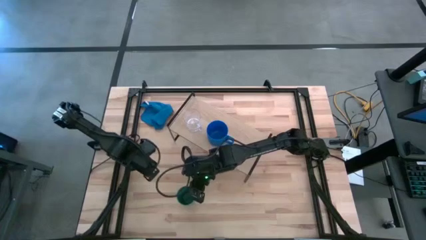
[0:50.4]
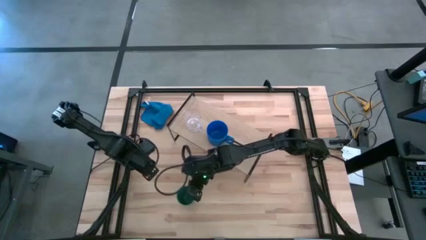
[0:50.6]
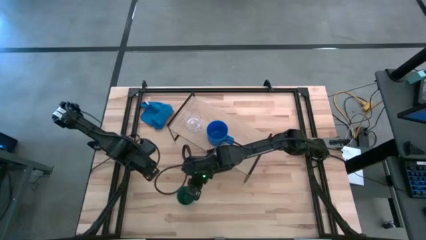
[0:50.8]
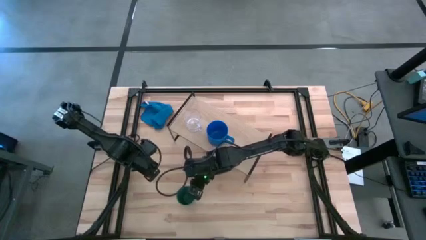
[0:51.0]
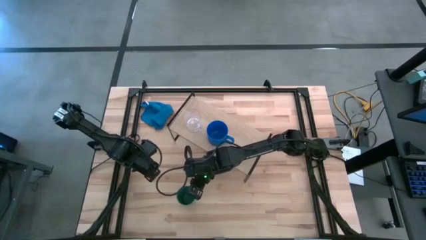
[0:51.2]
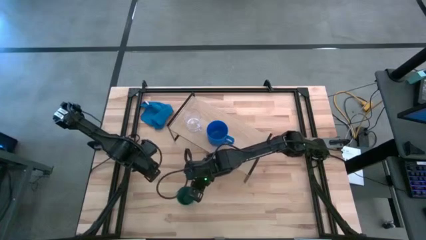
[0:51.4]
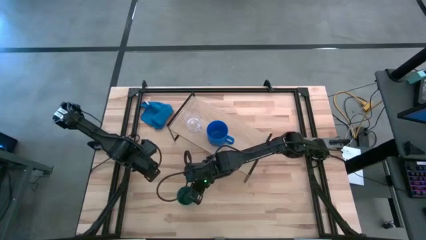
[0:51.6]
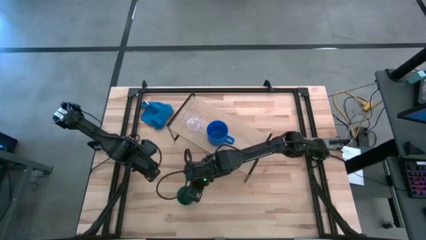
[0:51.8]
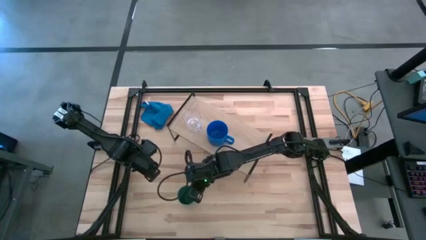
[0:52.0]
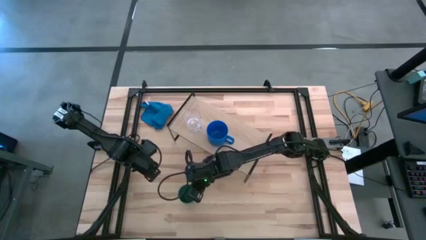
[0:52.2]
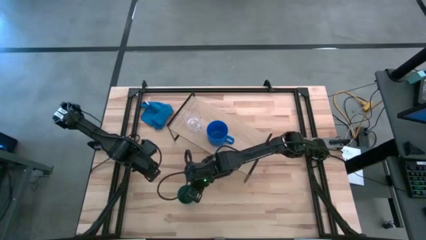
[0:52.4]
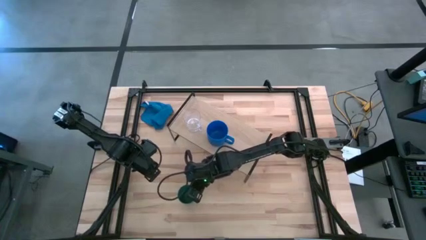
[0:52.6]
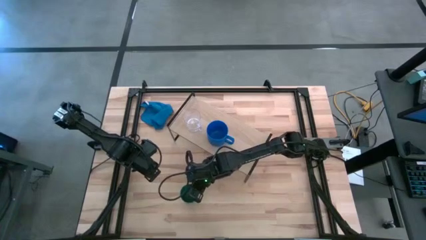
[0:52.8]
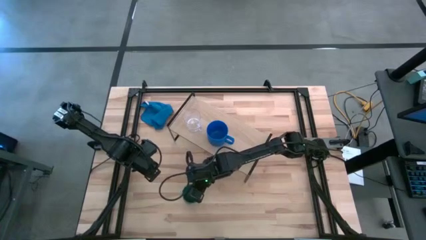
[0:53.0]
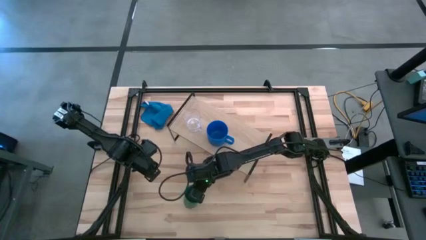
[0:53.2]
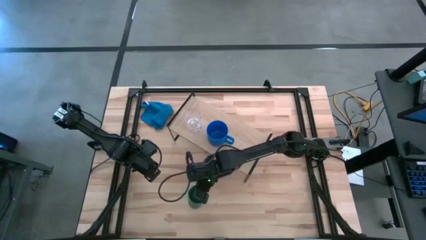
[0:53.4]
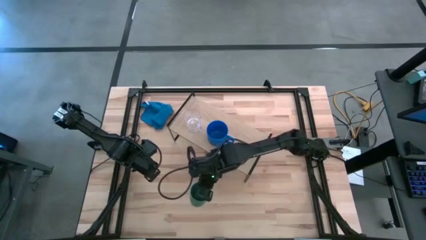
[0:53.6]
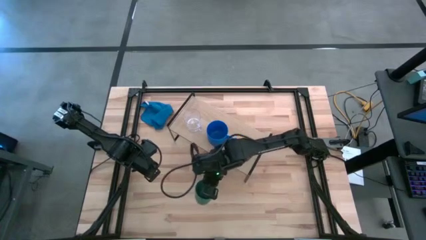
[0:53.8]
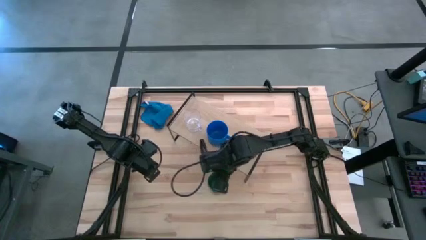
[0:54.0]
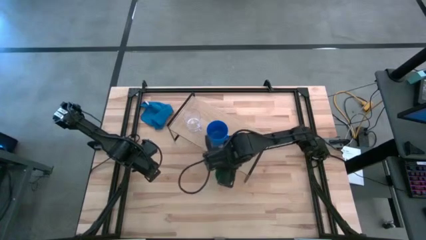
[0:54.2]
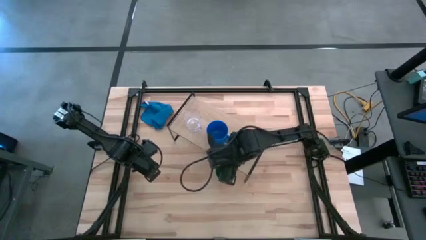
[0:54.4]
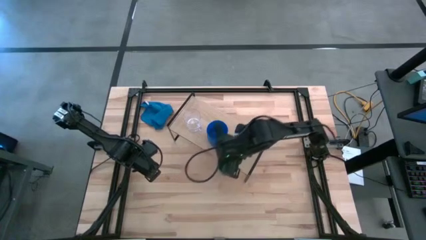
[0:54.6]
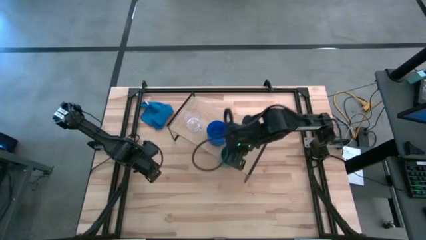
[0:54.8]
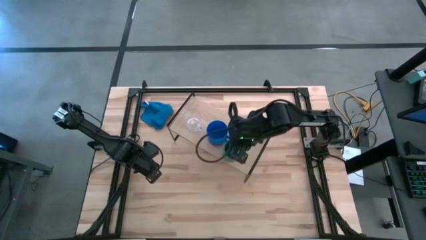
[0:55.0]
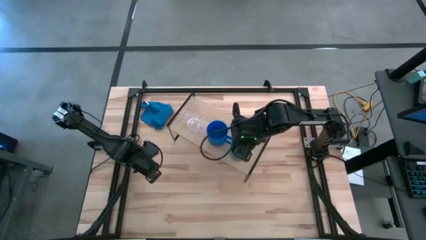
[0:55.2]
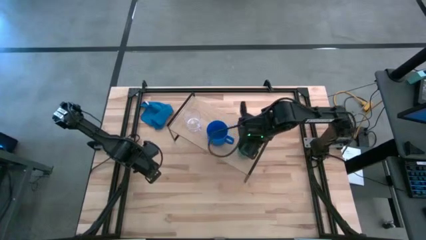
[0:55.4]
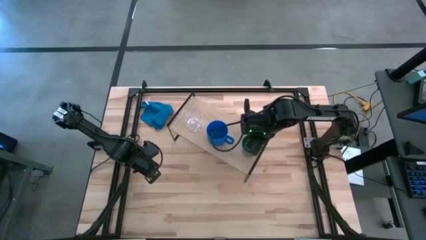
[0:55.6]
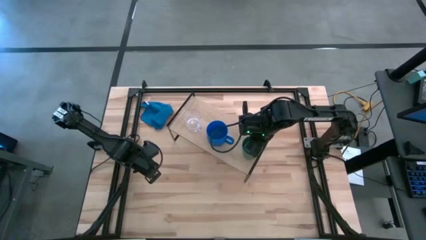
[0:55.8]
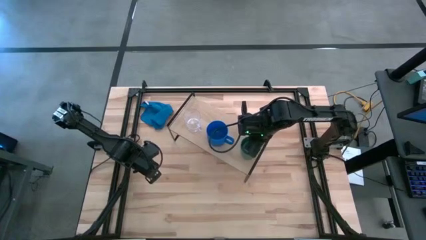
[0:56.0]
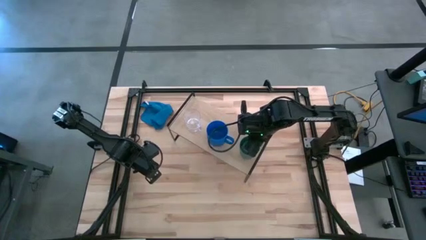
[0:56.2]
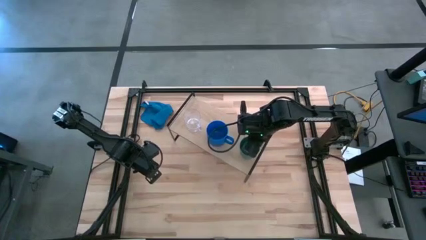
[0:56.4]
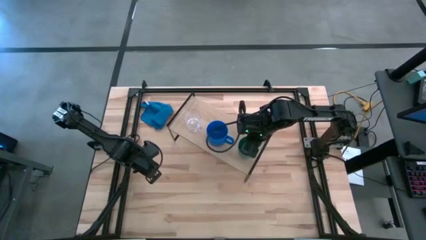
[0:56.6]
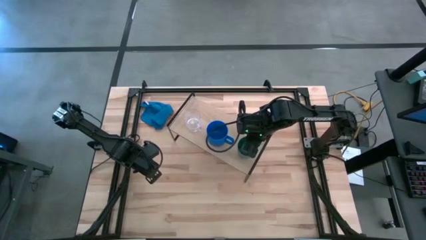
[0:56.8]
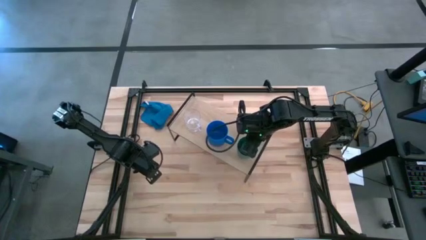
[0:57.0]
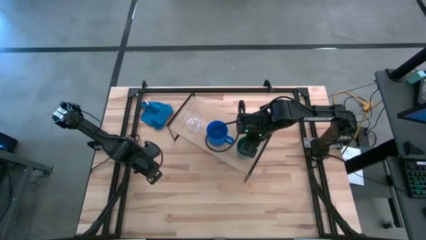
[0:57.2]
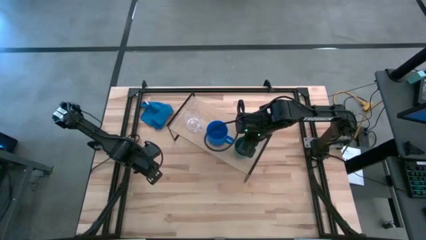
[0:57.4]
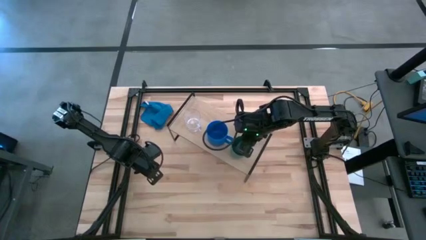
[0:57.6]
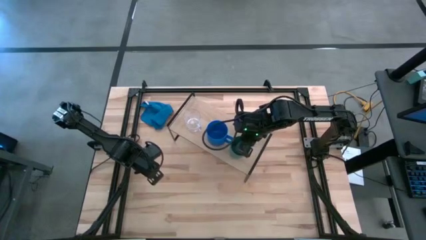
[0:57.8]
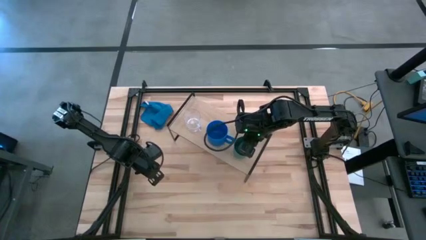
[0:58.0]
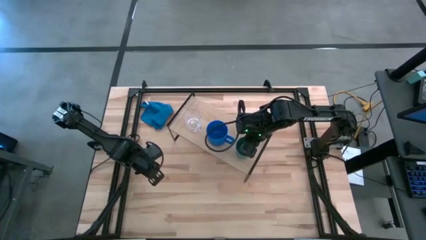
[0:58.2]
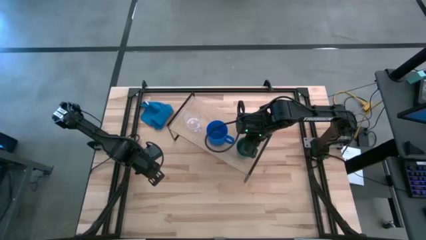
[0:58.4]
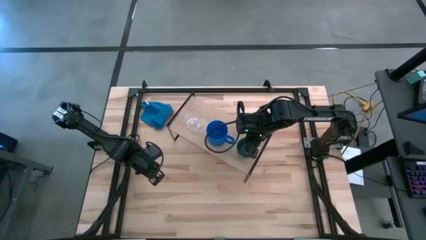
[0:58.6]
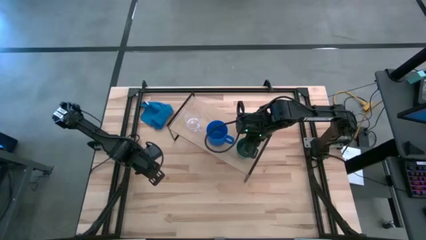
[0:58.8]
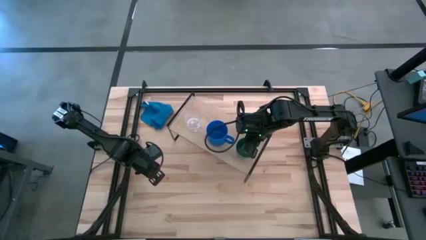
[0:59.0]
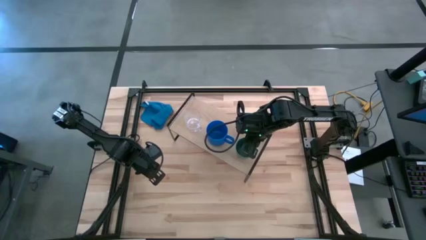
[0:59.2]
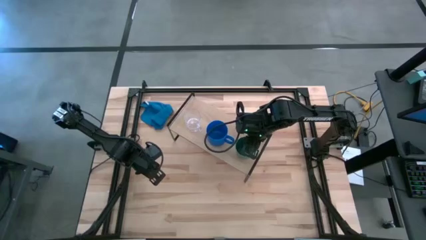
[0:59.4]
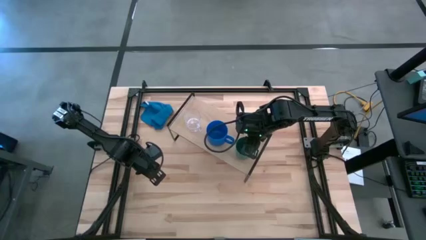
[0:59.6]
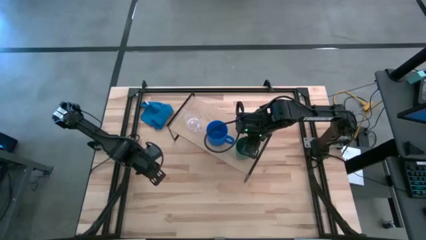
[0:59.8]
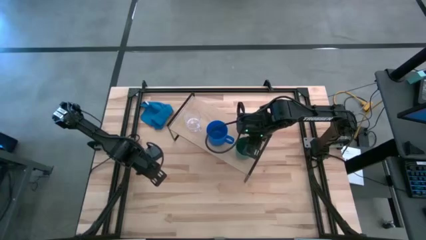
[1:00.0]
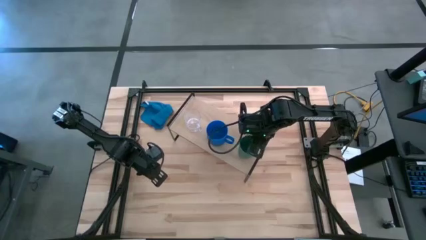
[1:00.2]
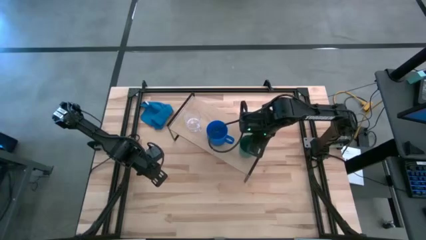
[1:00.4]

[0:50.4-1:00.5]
Task: Stack small to large cups/mugs on shelf
Put the green cup on the shelf

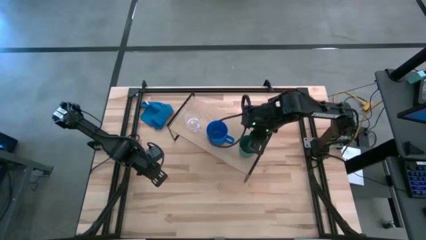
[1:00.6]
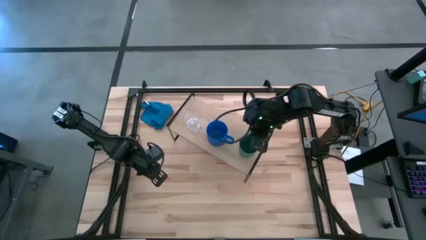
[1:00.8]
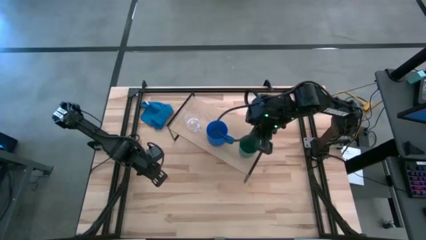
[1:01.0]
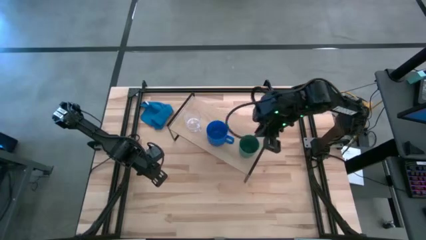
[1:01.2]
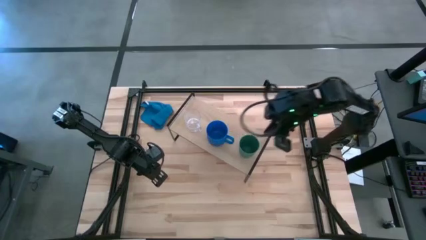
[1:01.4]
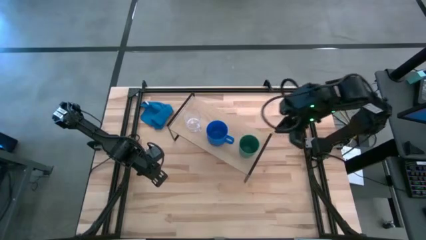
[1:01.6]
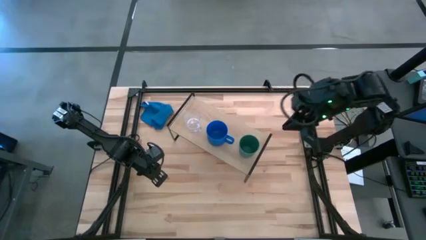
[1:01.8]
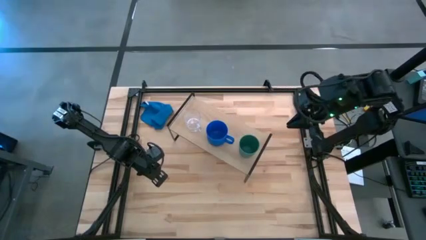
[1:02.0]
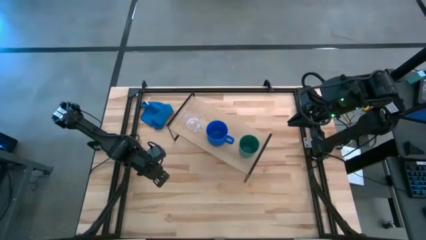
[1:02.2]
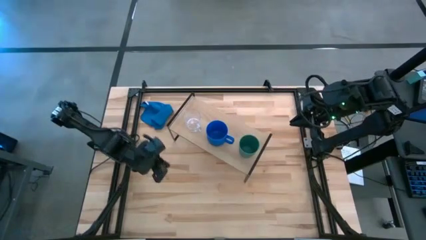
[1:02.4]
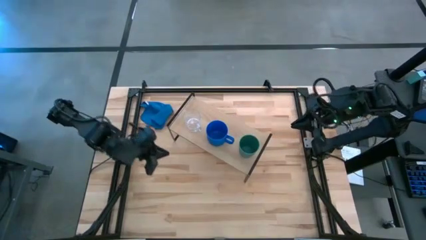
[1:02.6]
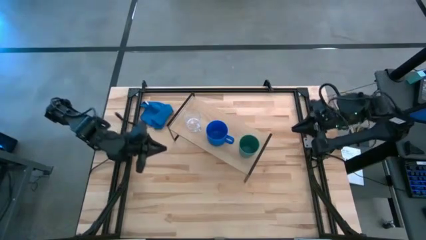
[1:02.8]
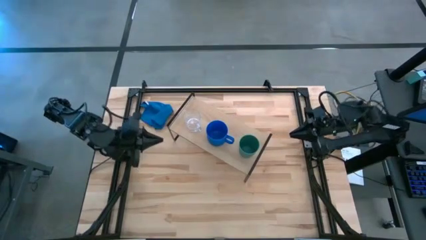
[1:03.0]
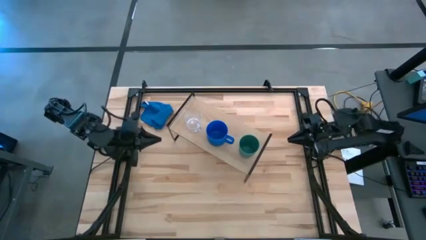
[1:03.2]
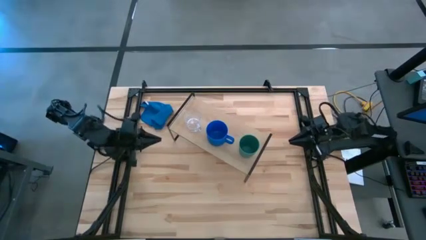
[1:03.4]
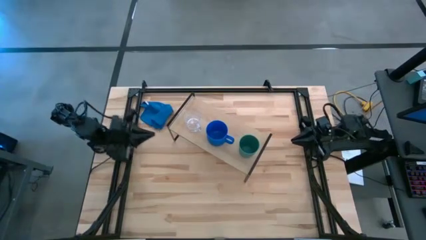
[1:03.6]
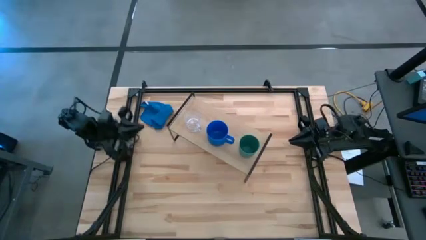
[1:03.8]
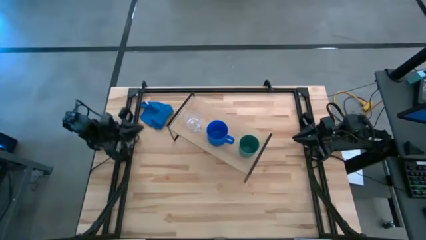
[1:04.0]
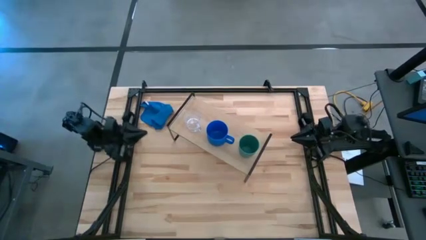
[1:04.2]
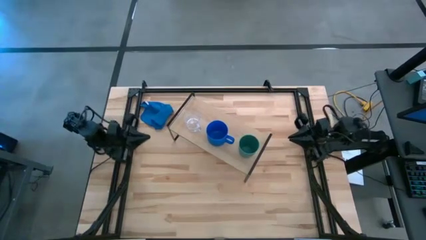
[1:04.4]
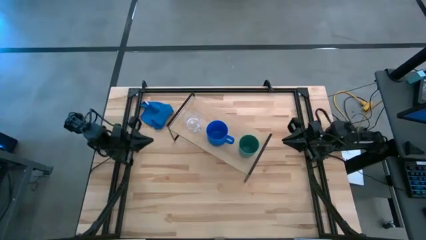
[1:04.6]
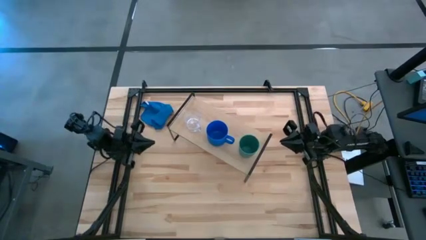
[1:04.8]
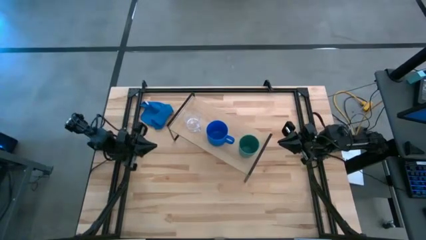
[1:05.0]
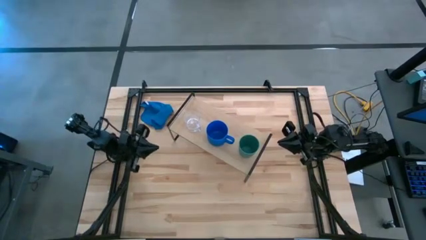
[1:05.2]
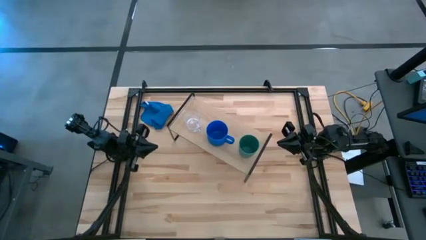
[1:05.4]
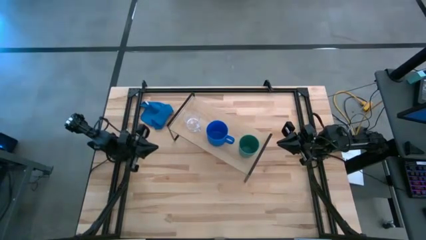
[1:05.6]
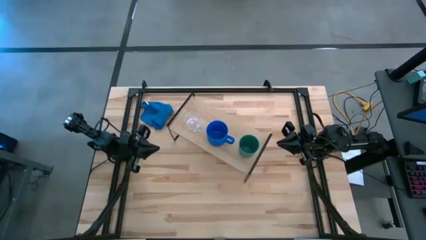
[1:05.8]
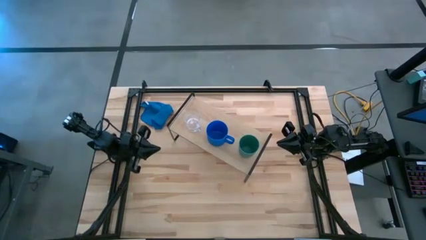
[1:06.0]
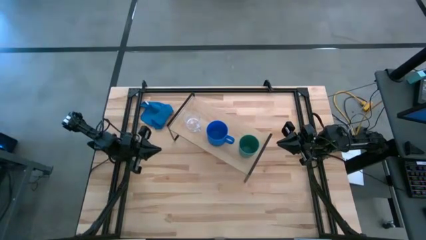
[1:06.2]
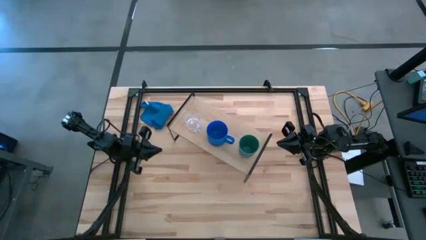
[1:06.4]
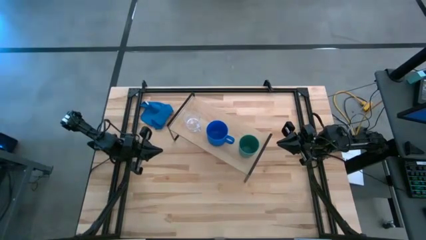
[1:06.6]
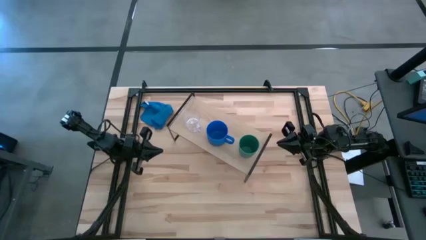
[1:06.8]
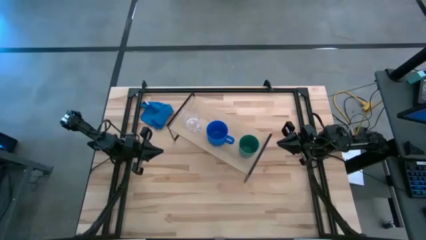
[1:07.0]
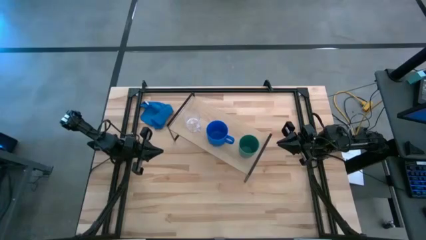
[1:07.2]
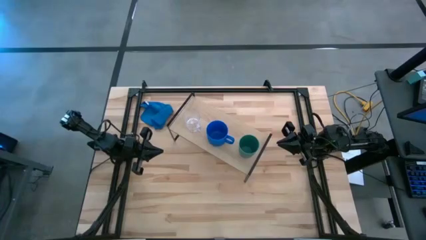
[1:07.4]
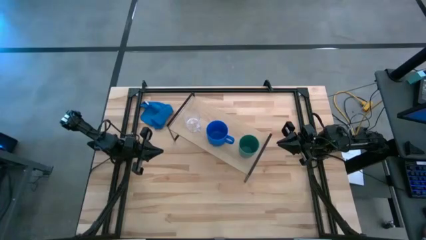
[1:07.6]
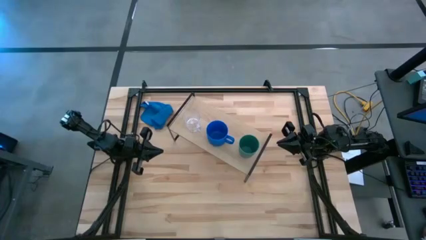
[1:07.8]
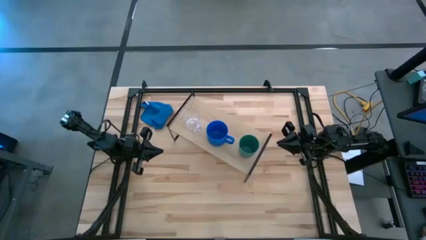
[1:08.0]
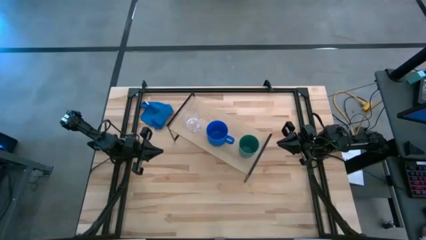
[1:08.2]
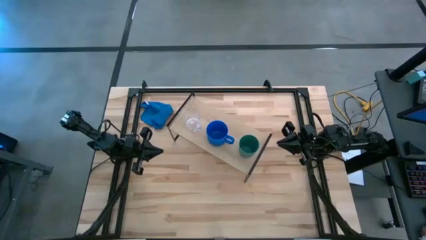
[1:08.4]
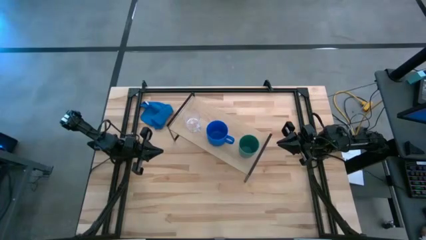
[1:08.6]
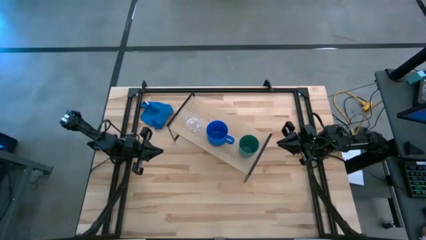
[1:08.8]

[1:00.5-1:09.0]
Return to Home Position
